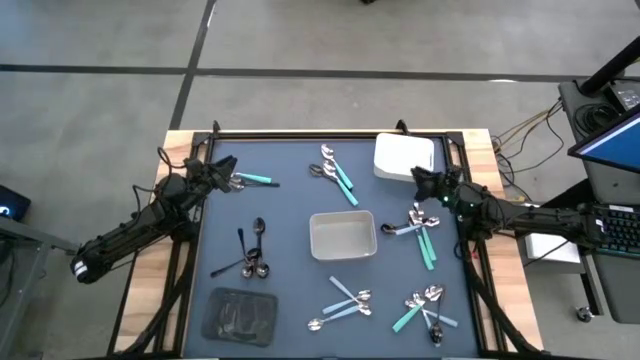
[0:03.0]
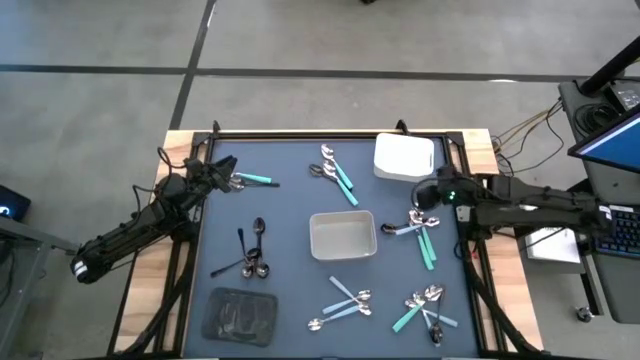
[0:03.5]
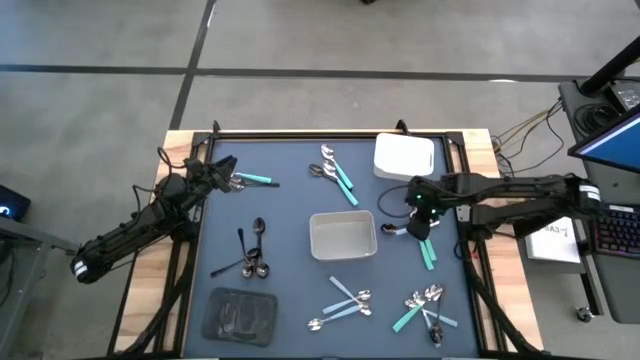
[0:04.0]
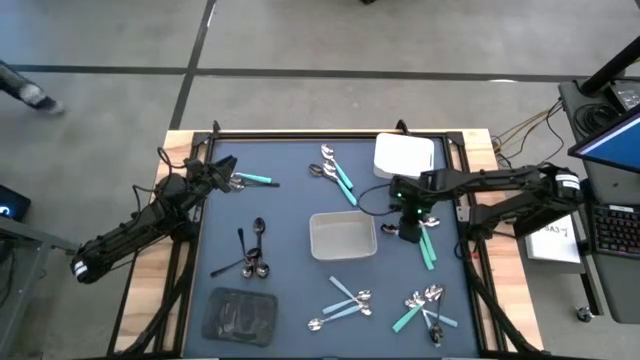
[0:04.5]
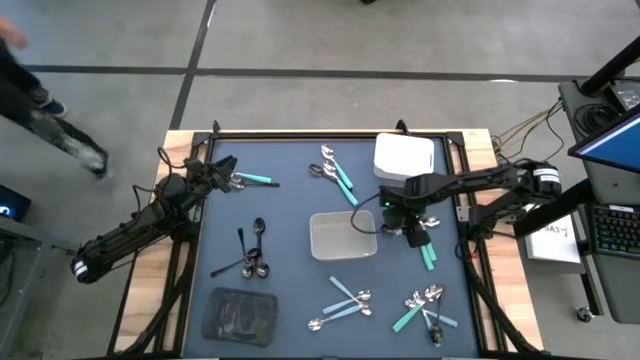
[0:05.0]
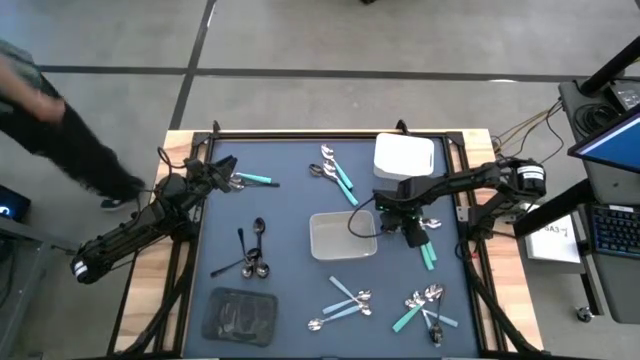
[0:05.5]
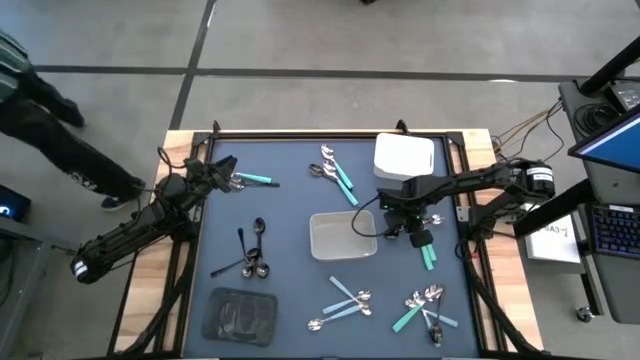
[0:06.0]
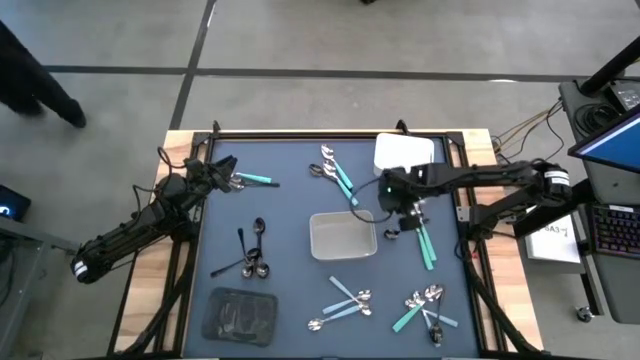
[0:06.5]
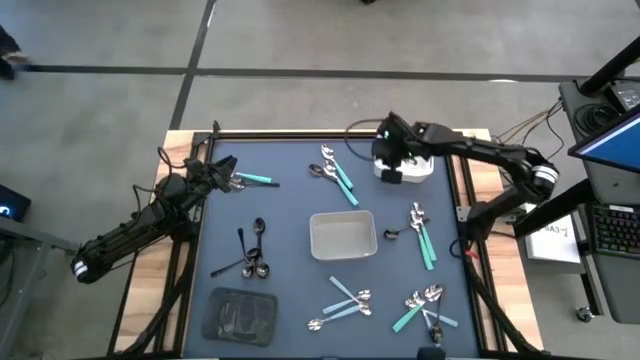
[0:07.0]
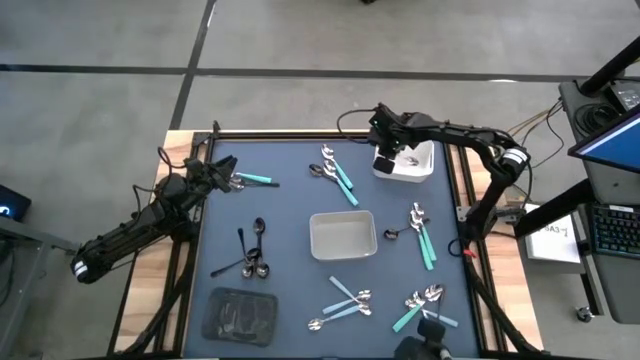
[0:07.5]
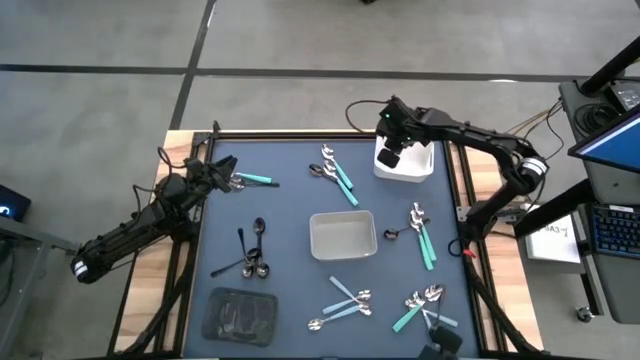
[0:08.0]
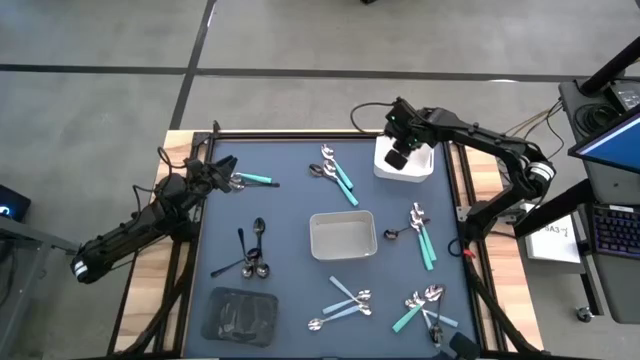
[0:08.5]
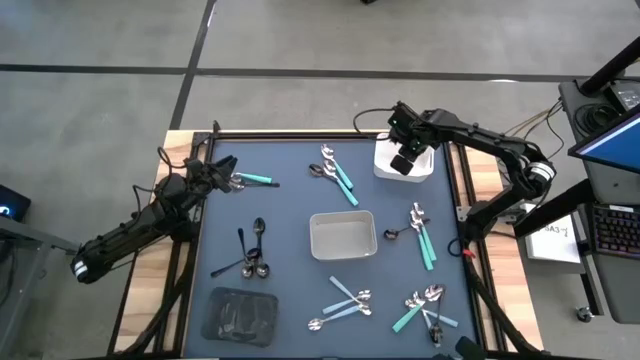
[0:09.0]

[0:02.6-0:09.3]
Task: Sort silverware by color (type)
Put the blue spoon into the white bin

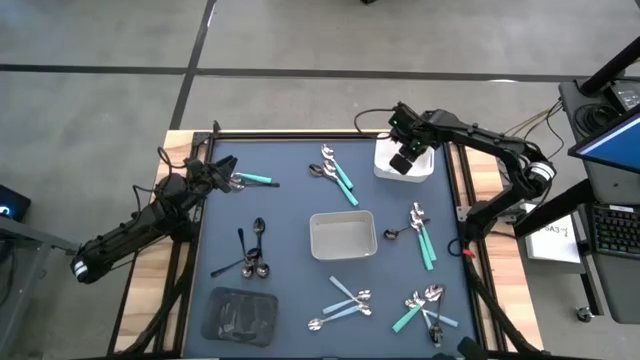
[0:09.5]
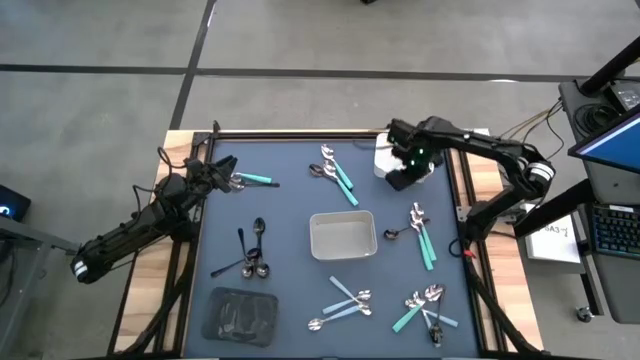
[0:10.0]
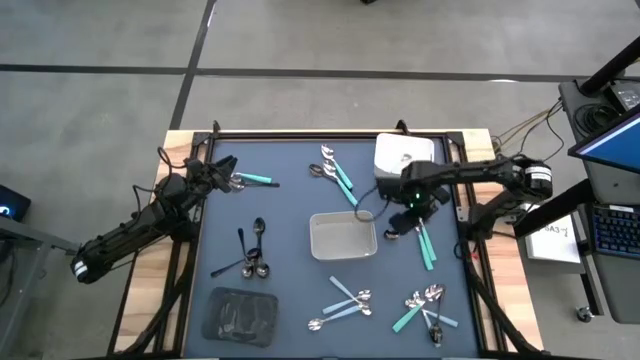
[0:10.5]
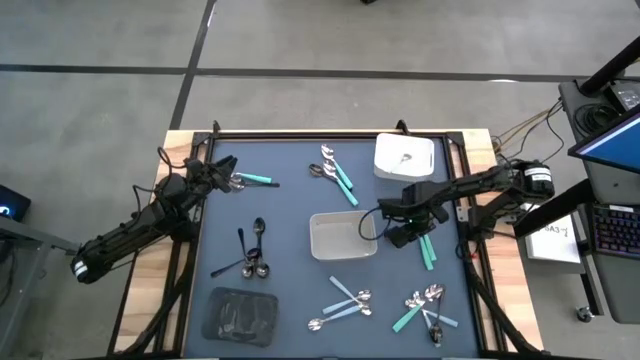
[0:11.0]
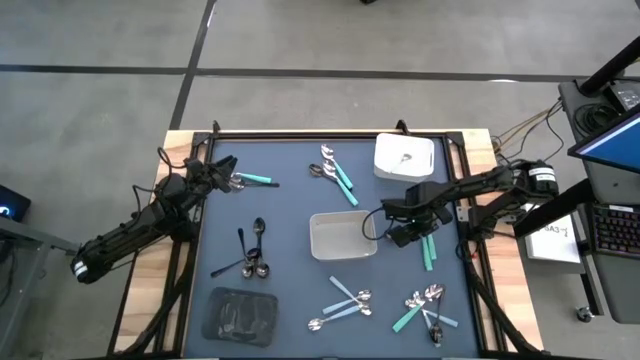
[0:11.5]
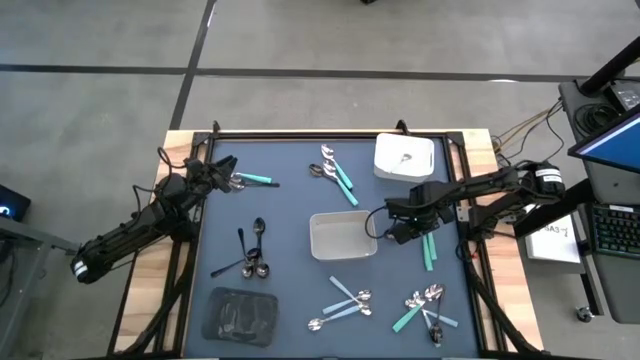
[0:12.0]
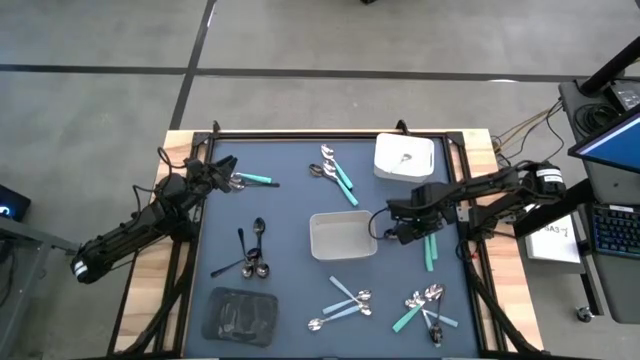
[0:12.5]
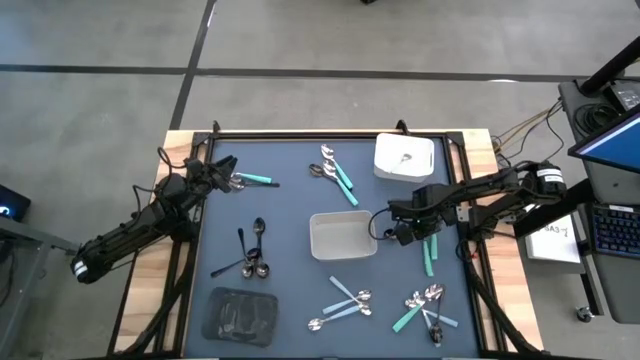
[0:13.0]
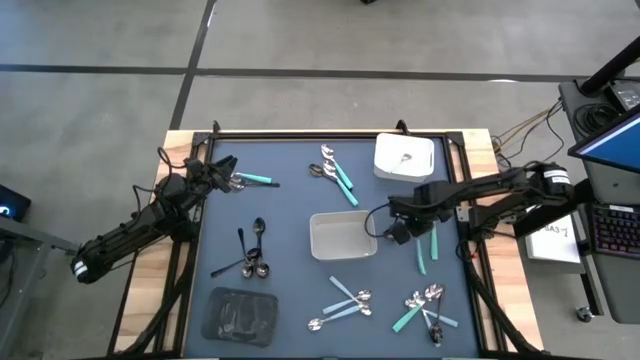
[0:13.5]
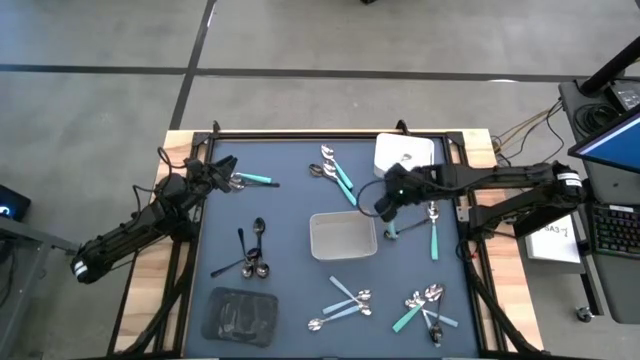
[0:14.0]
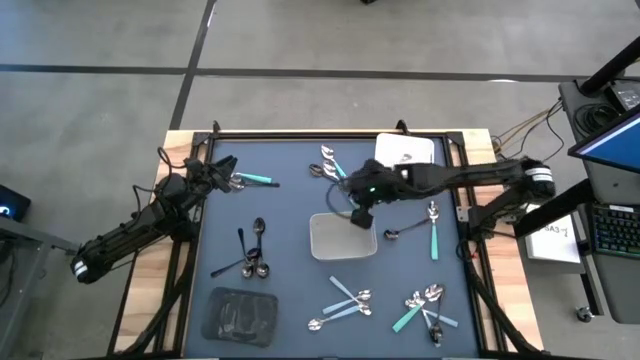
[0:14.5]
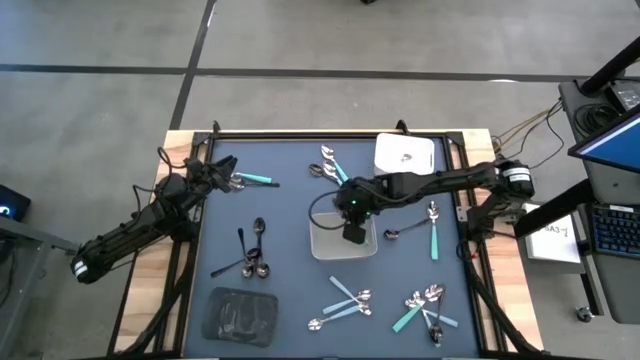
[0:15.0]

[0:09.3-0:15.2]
Put the green spoon into the gray bin

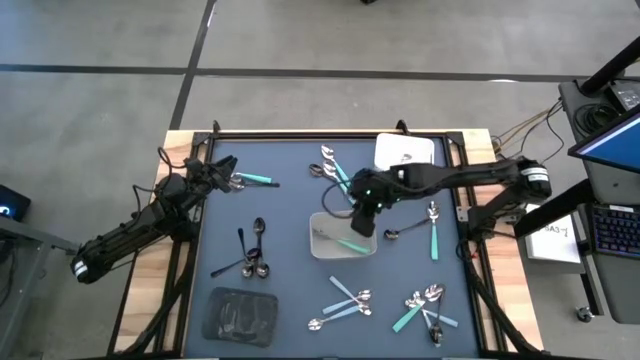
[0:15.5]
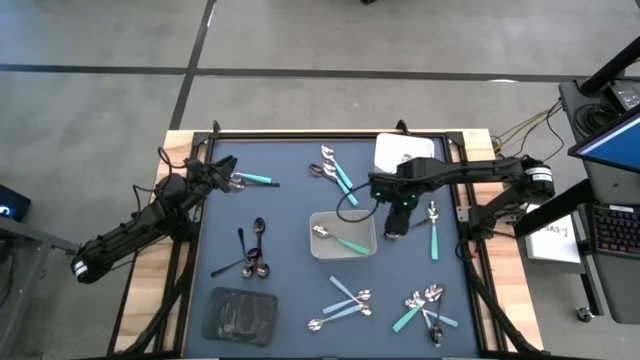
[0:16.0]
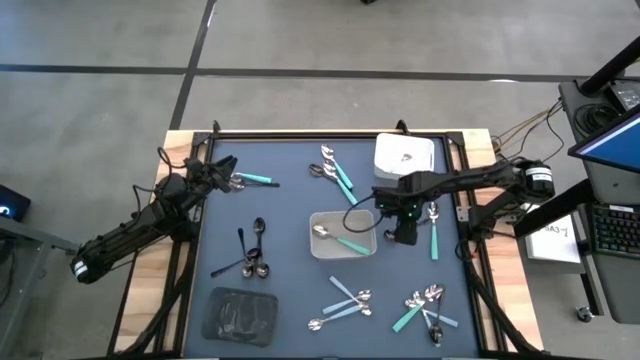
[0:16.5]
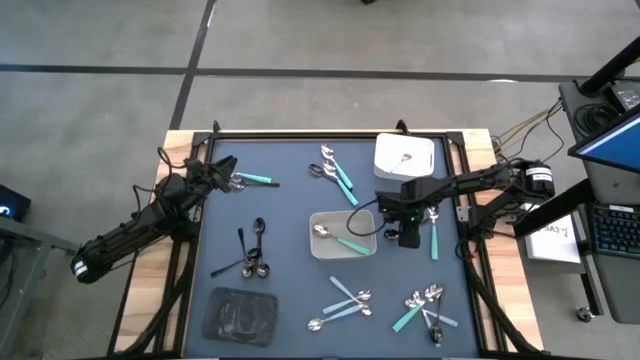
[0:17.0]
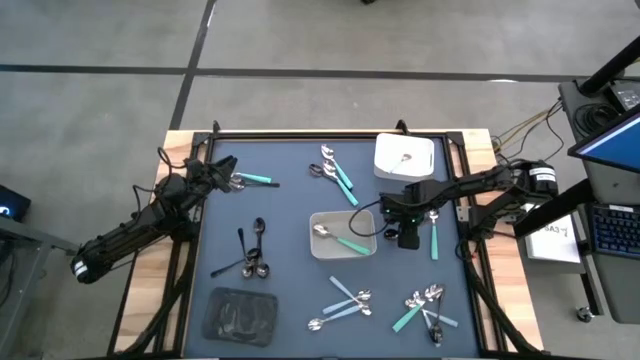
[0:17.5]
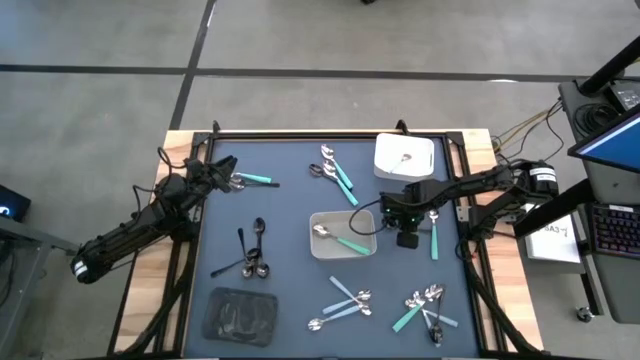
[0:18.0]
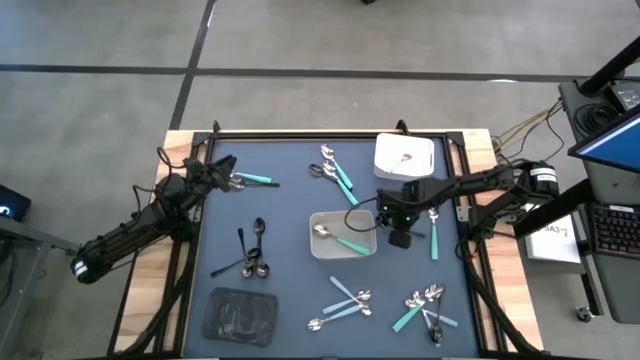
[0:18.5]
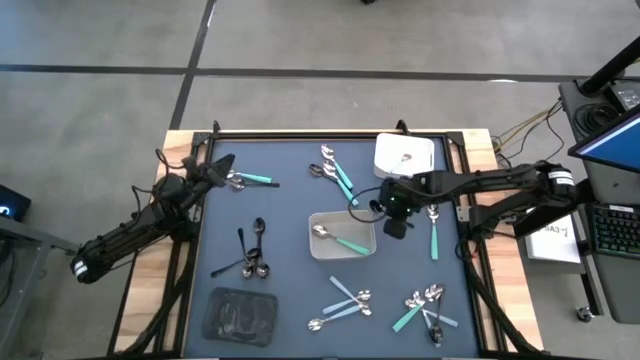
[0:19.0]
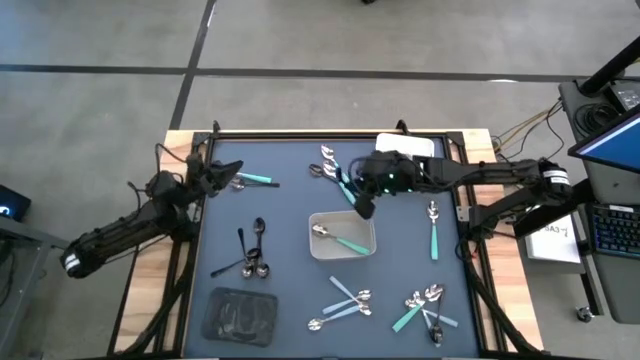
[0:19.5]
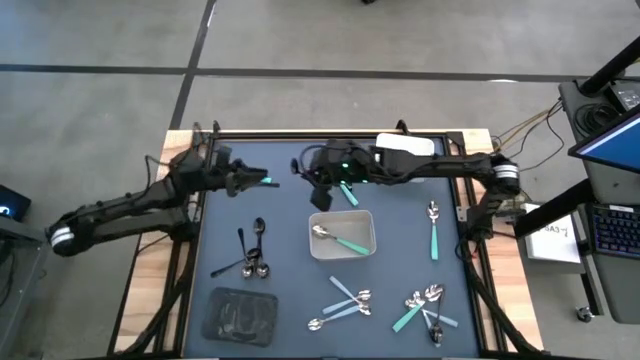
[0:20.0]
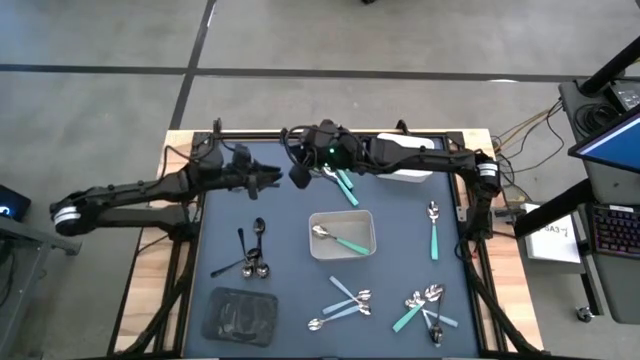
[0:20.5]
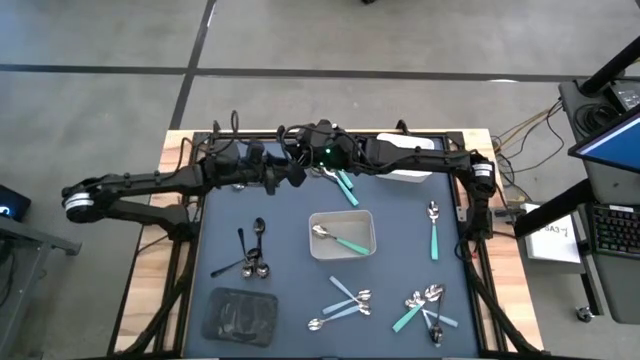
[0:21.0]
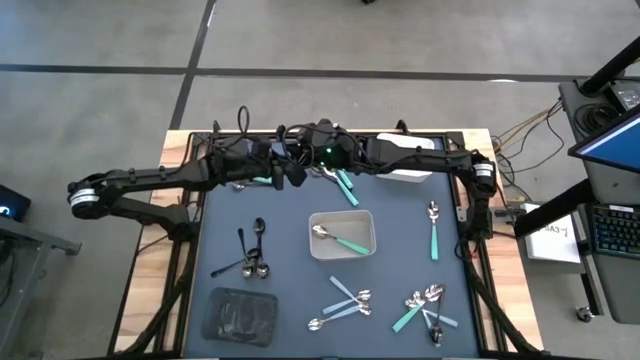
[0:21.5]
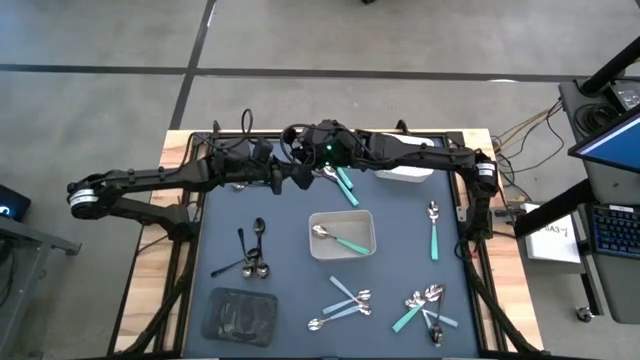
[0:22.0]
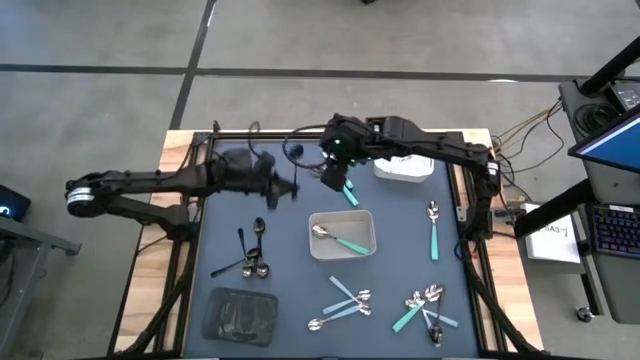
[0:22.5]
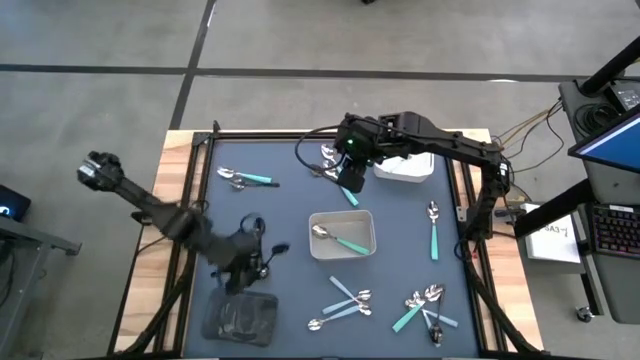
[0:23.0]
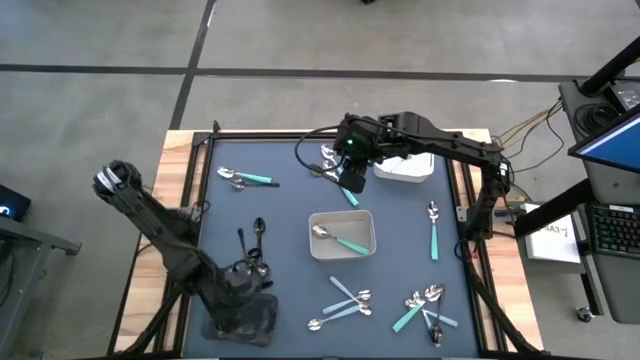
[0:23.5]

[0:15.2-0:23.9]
Put the black spoon into the black bin
